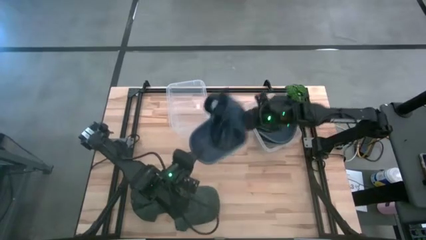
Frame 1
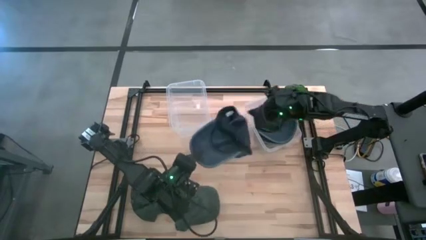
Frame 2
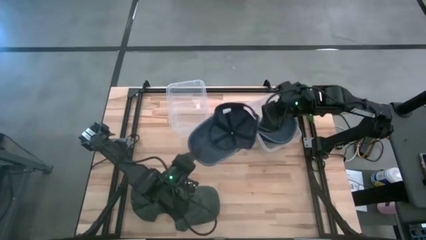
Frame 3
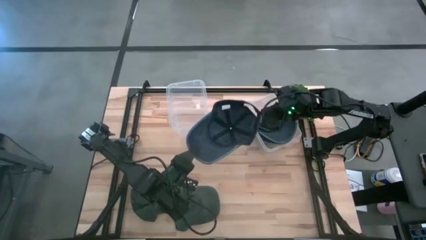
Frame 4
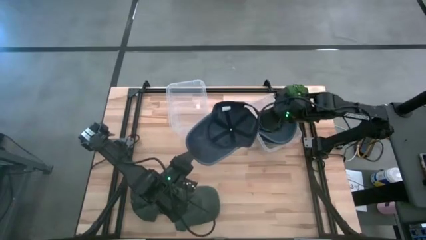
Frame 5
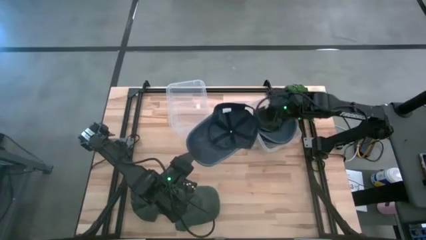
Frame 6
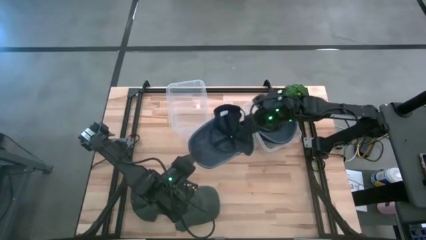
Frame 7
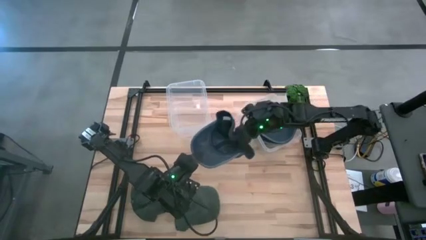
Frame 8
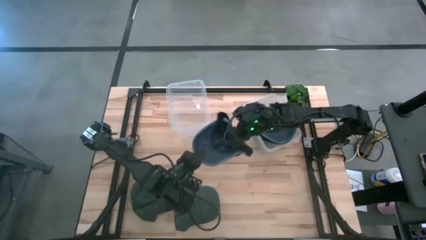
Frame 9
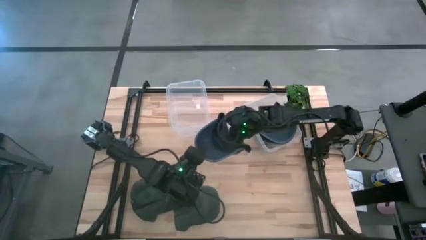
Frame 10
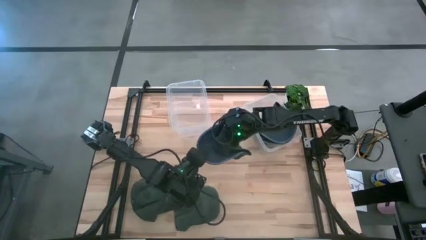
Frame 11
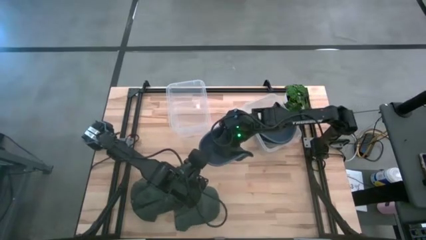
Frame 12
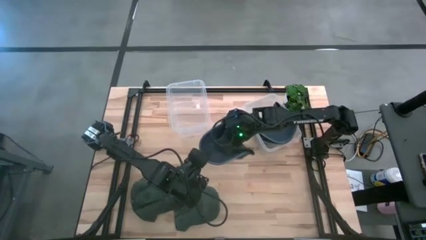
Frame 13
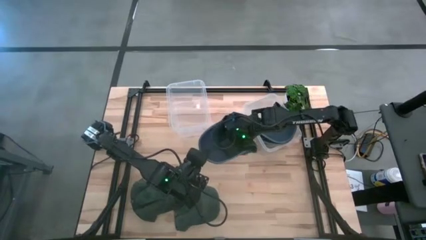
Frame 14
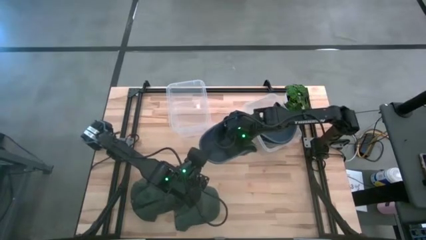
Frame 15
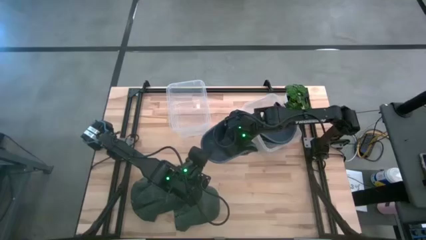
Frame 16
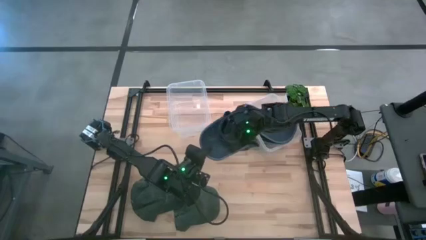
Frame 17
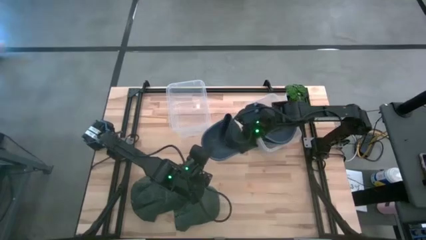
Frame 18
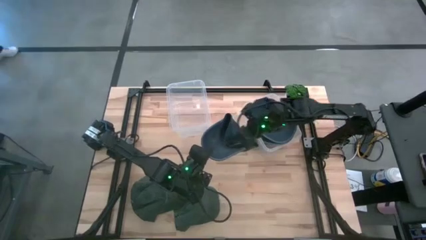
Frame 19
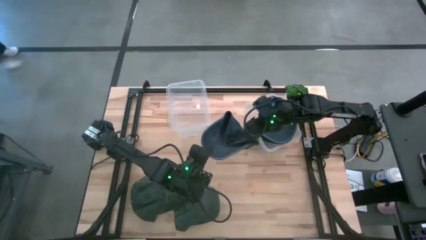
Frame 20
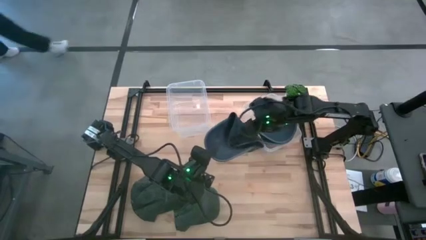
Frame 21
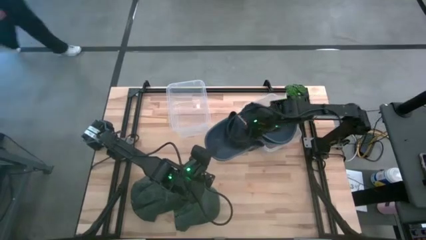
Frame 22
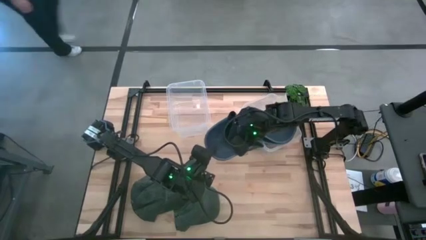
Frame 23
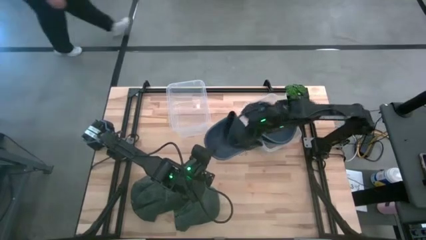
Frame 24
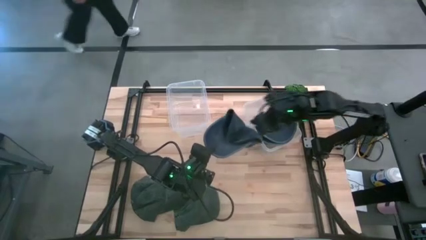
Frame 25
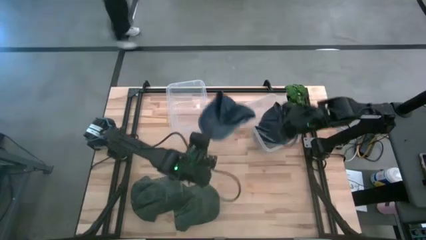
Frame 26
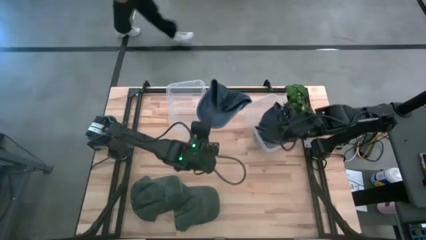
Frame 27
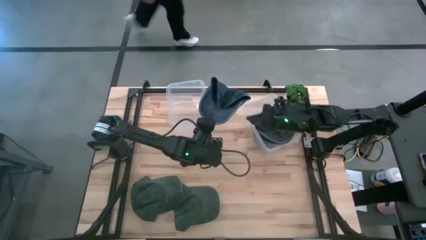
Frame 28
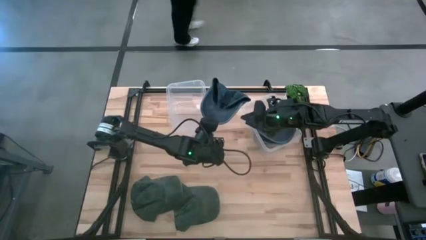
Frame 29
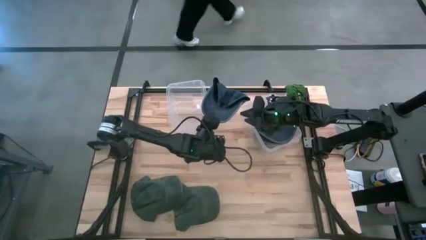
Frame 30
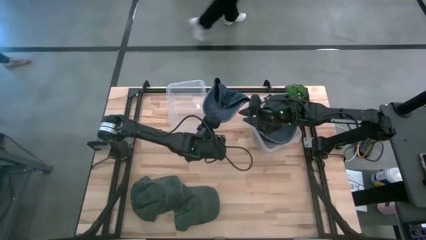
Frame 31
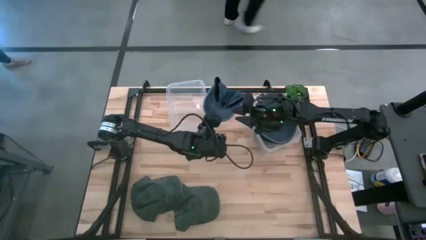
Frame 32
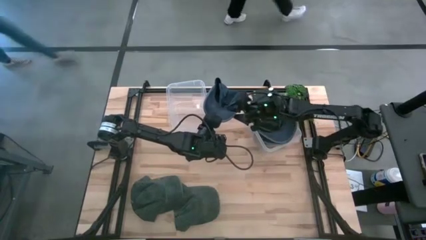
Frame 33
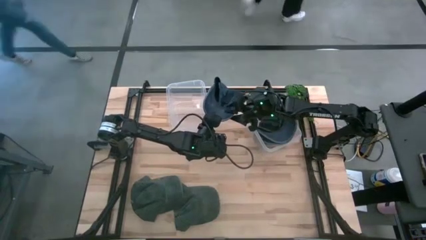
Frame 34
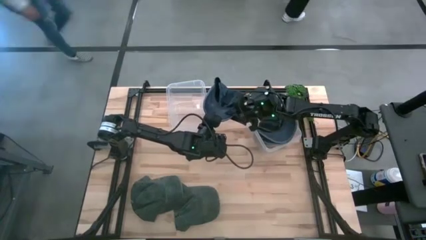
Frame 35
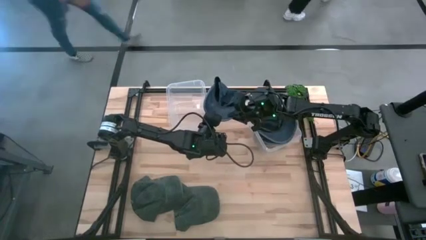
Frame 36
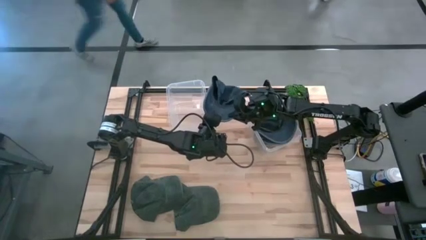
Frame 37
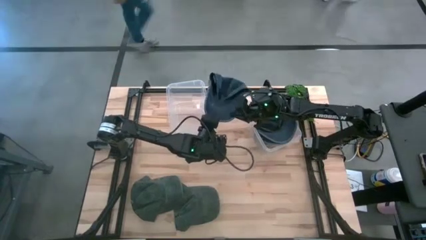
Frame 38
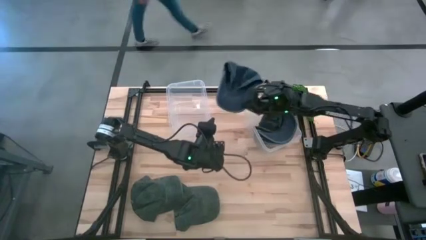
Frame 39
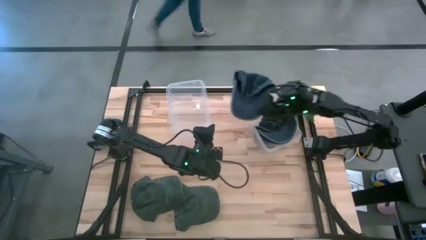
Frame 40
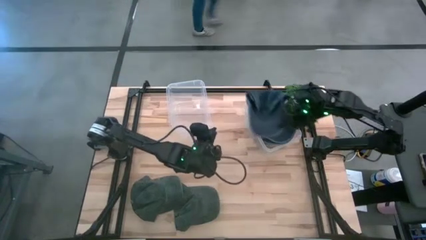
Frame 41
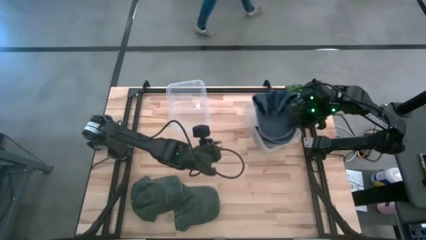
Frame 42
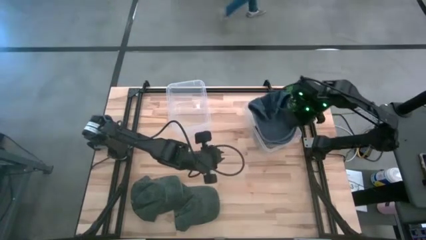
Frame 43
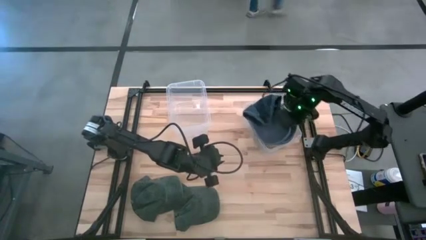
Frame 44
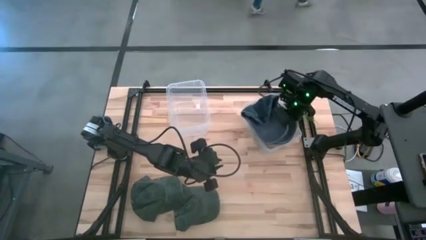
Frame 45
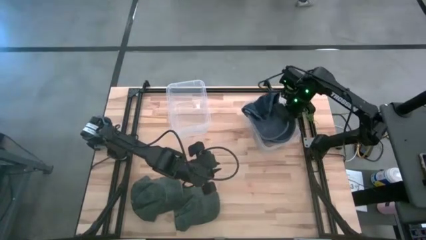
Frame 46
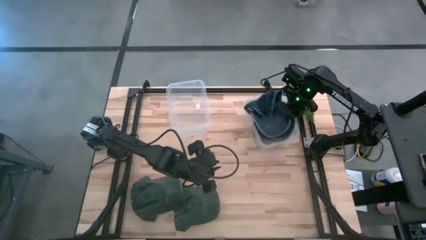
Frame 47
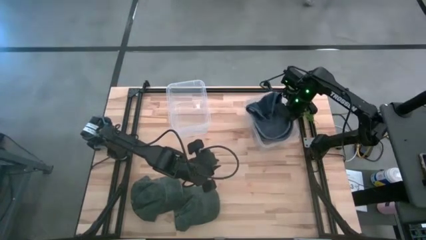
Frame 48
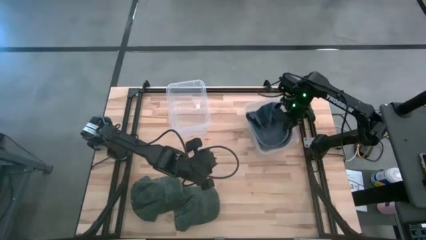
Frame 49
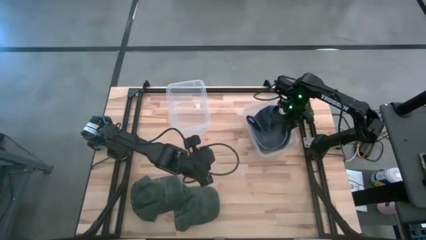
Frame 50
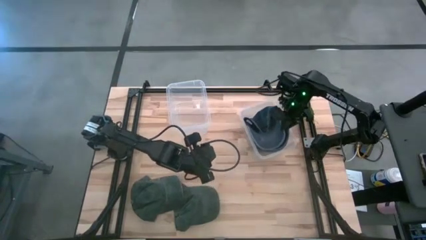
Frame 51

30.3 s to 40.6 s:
Task: Pick & Place hat
Put the blue cap into the right transparent bin

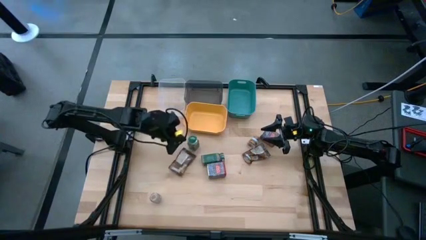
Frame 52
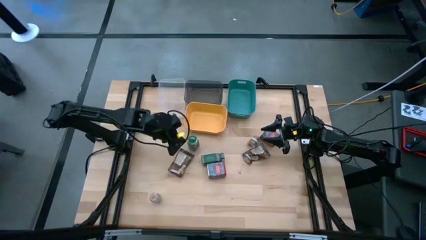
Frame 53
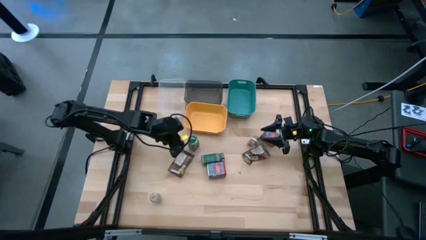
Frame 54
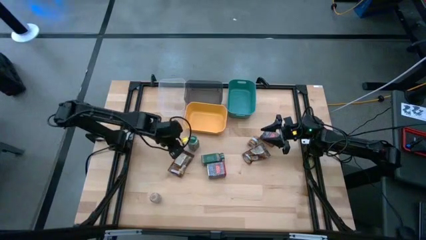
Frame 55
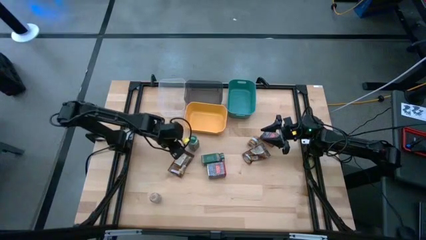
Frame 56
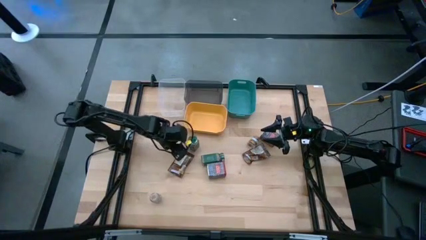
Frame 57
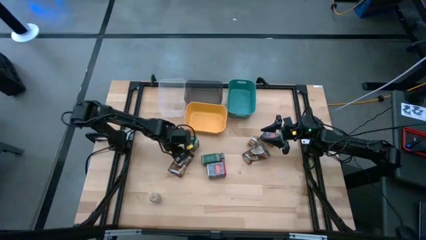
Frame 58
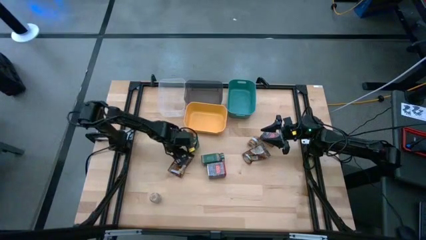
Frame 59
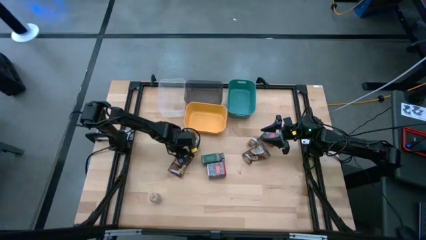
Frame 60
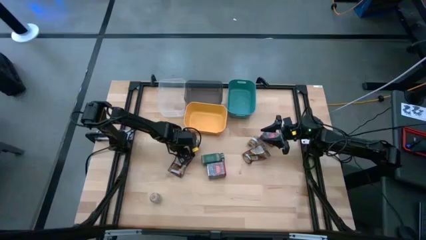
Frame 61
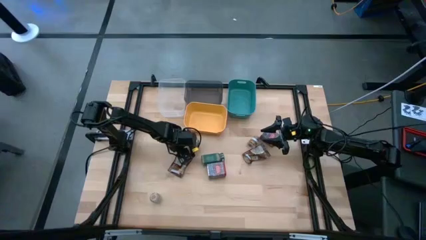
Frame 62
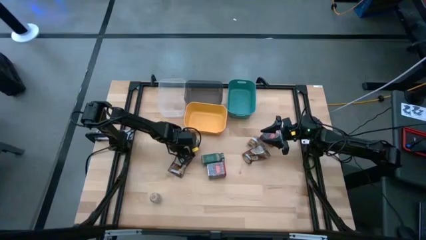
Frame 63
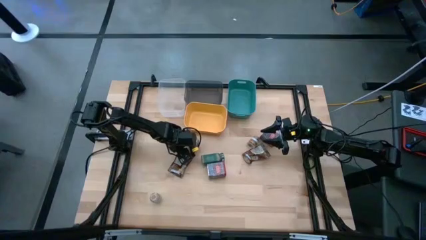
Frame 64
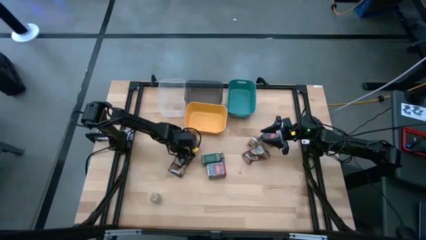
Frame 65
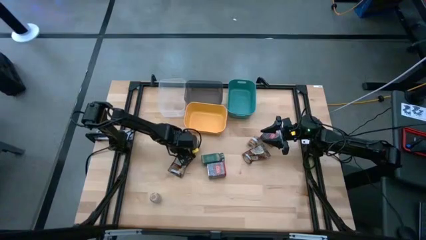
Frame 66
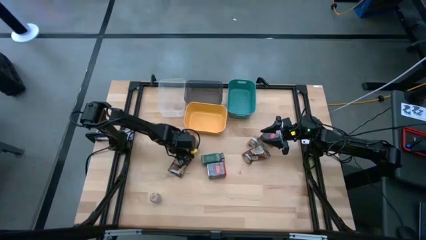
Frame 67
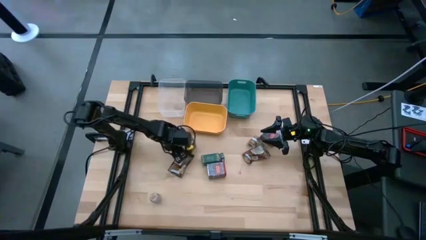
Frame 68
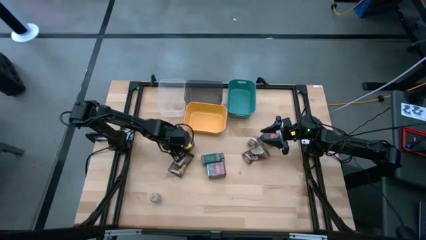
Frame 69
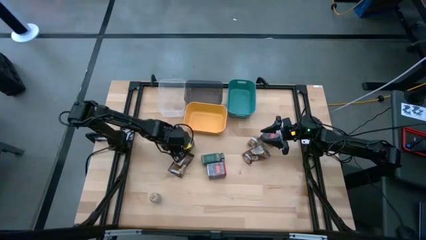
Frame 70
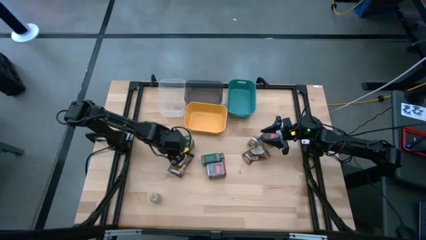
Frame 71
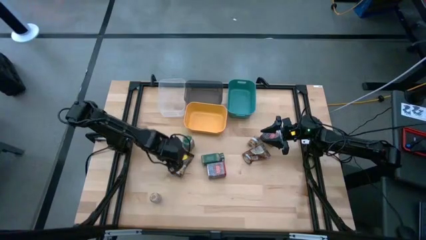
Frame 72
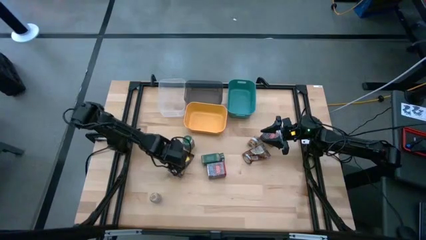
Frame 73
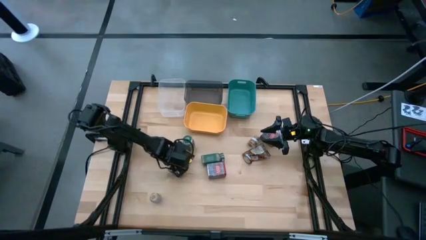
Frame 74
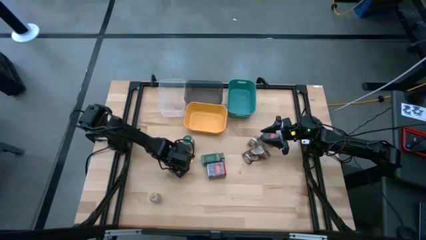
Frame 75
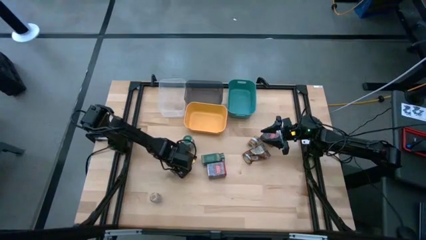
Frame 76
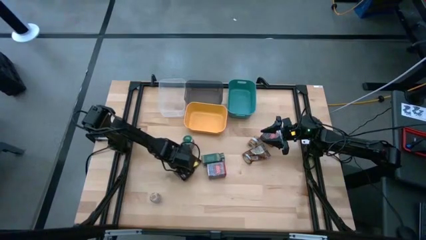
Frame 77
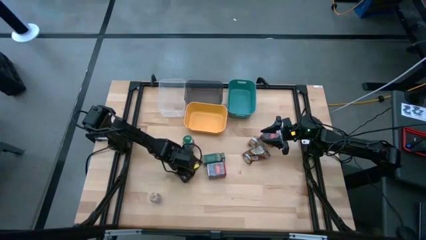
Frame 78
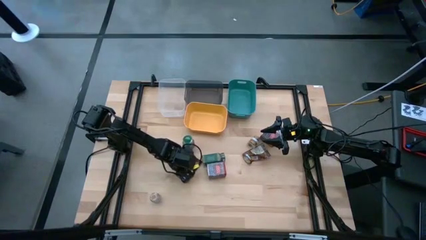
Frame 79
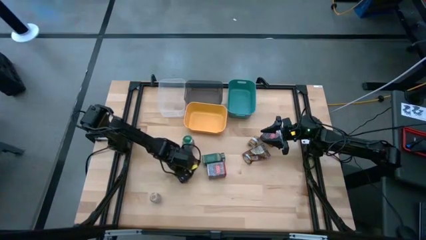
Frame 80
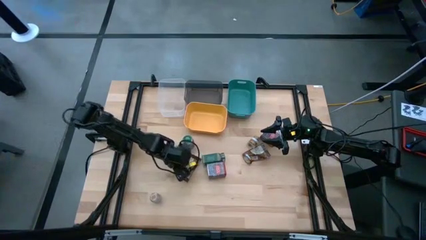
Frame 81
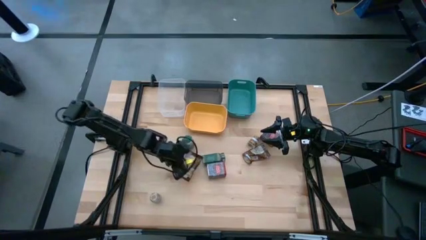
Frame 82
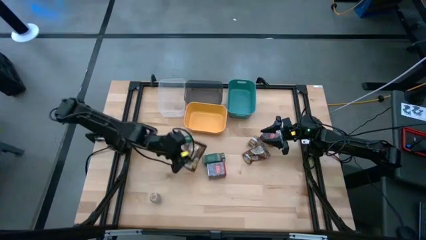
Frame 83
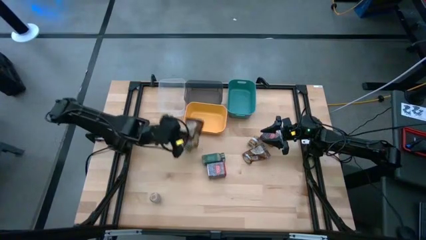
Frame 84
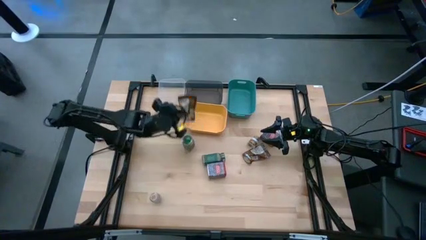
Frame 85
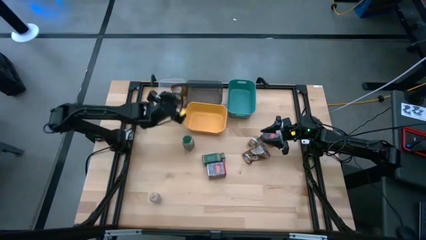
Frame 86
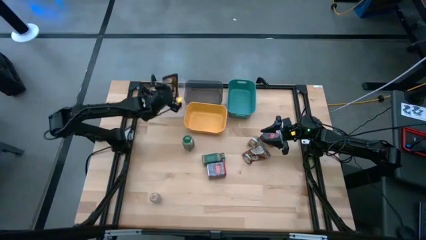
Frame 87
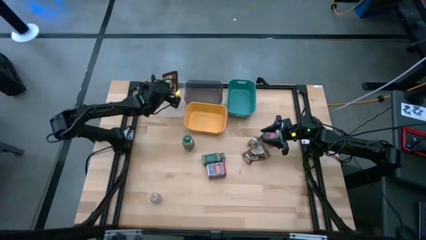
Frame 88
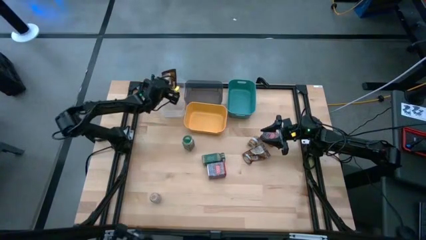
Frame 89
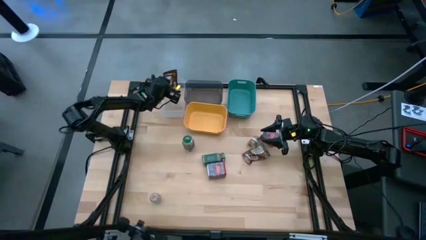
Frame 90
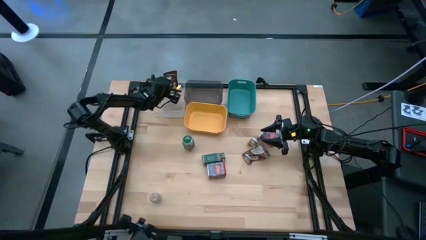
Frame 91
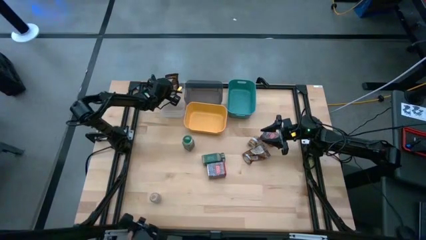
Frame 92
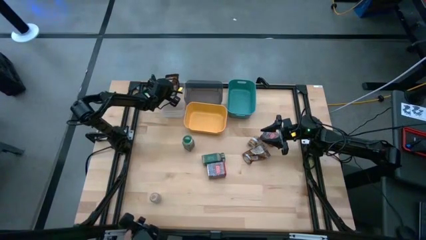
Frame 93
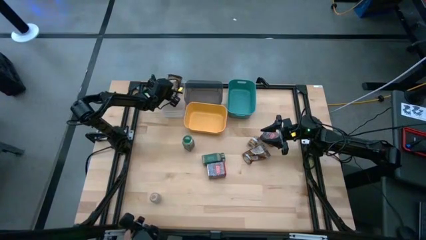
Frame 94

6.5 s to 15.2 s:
Task: Sort spices by type
Put the left orange seasoning bag into the transparent bin
